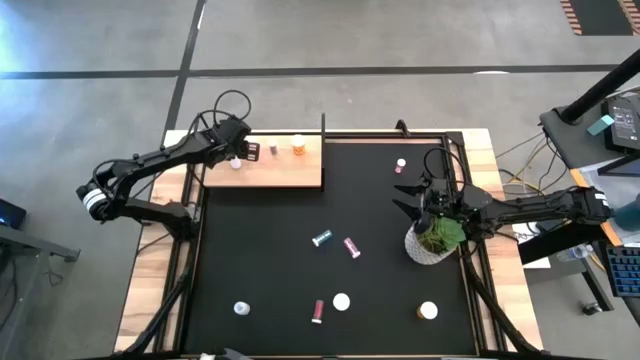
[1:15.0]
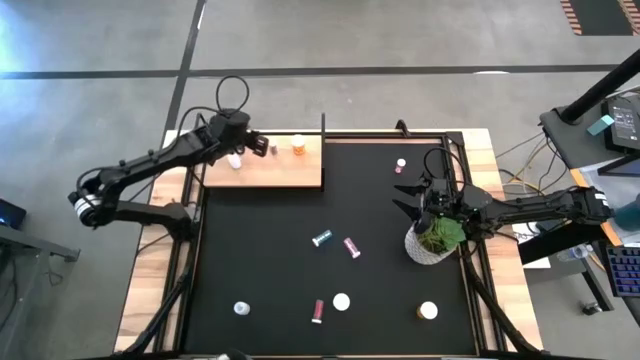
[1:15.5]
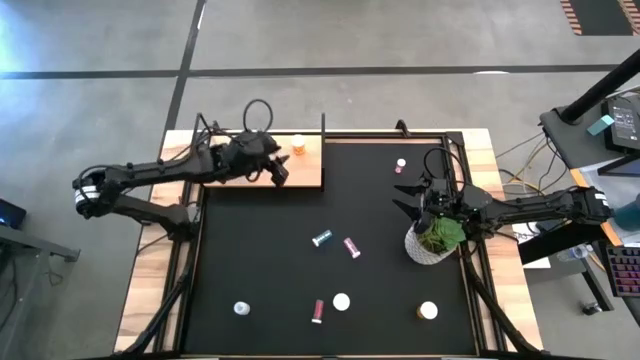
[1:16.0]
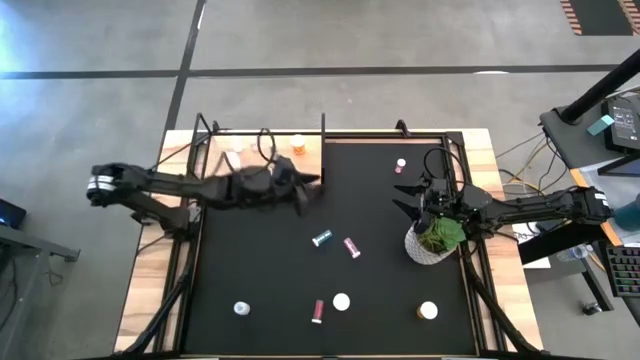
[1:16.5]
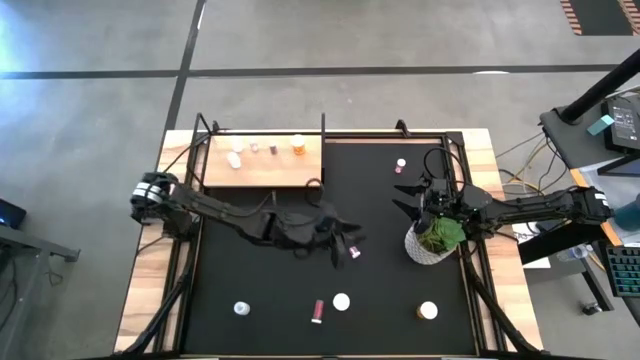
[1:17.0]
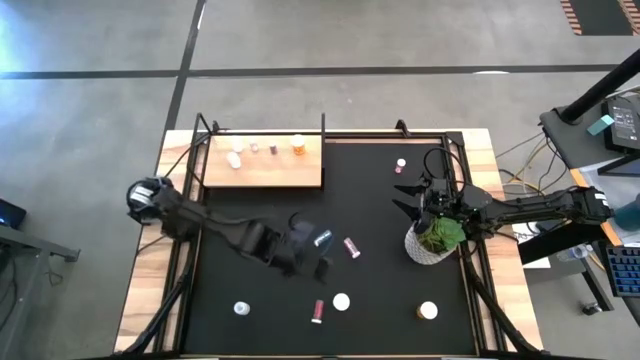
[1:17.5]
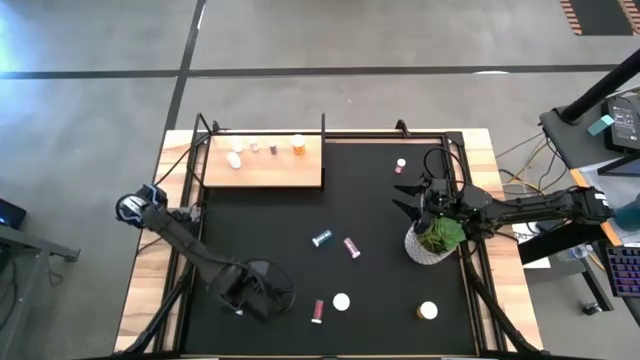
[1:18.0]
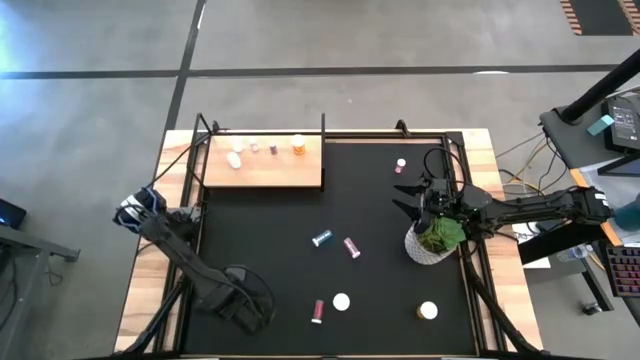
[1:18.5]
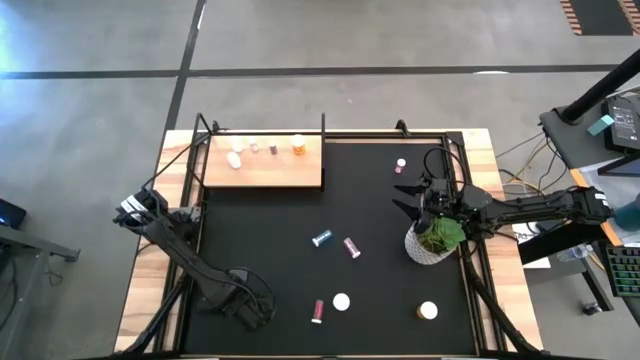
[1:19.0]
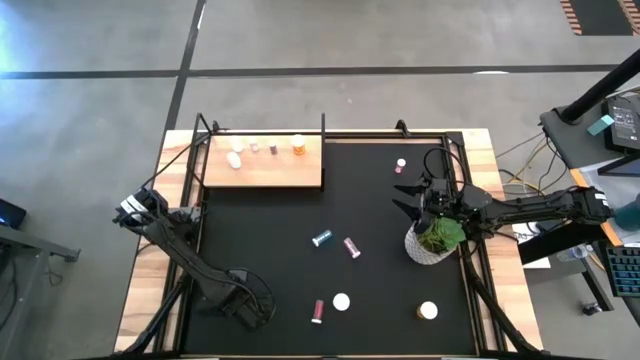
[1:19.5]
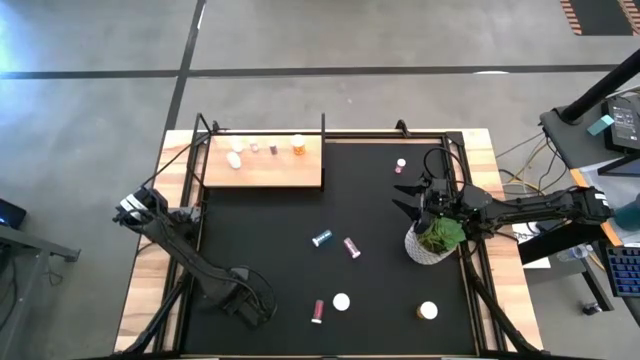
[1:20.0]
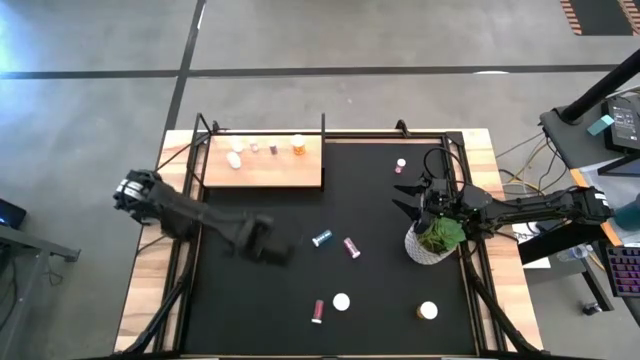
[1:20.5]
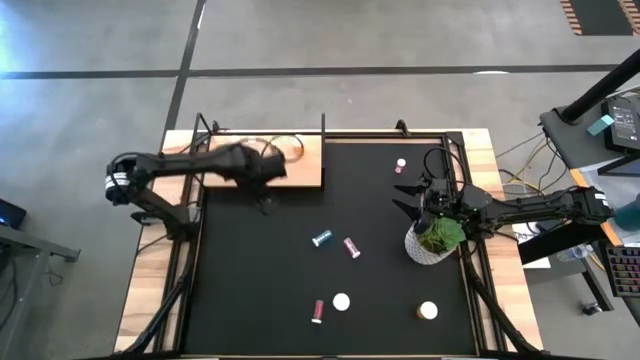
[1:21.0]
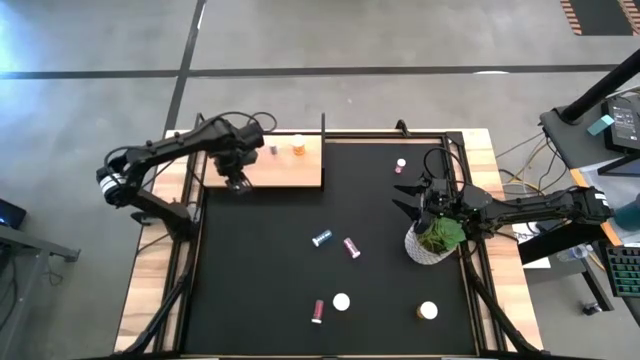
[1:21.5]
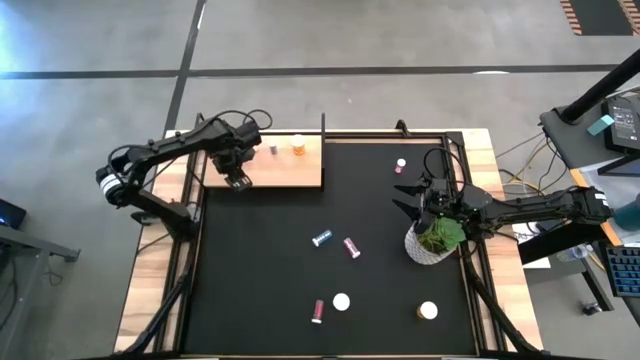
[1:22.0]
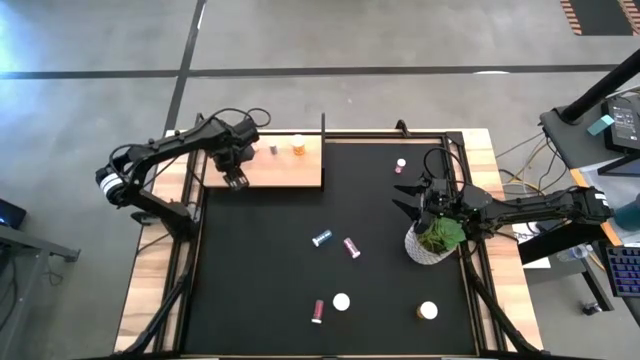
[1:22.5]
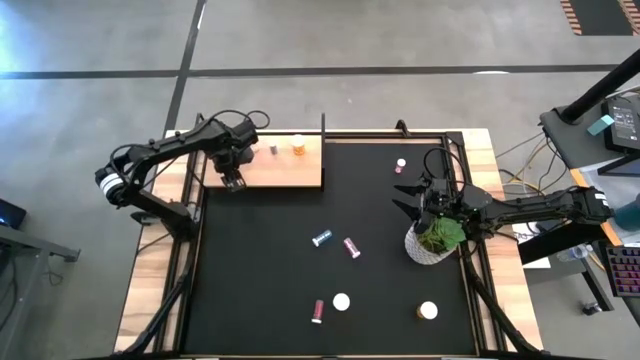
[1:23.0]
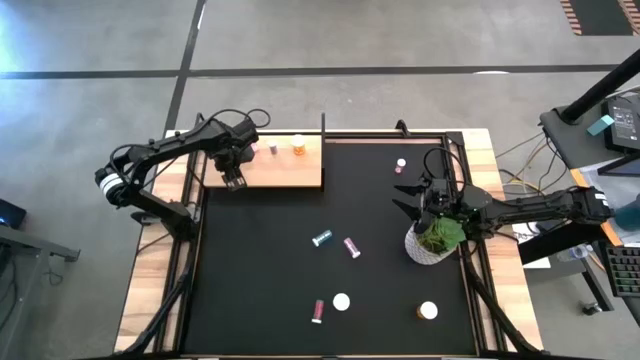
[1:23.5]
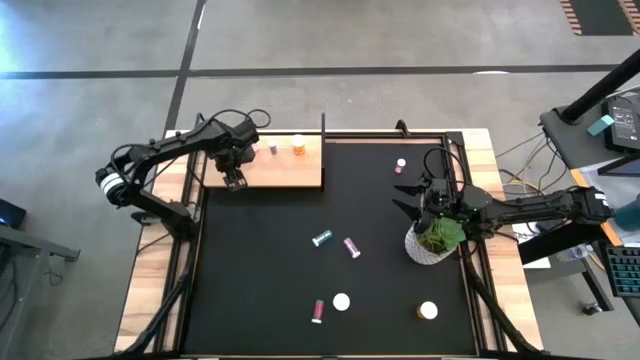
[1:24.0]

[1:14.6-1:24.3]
Task: Pick and place medicine bottles onto shelf by color
Put the white pill bottle into the shelf

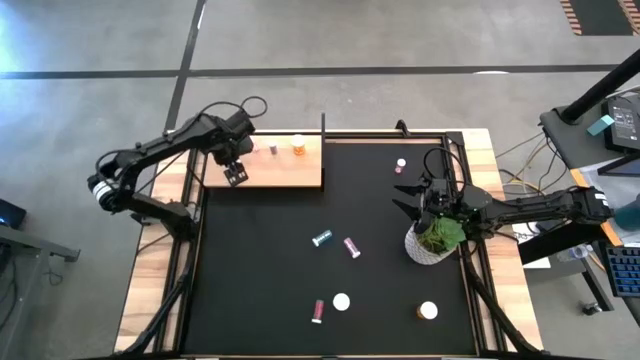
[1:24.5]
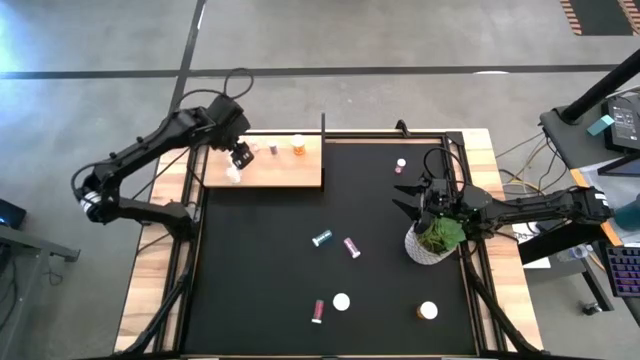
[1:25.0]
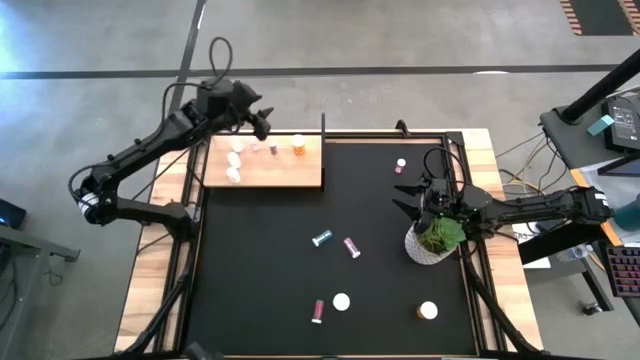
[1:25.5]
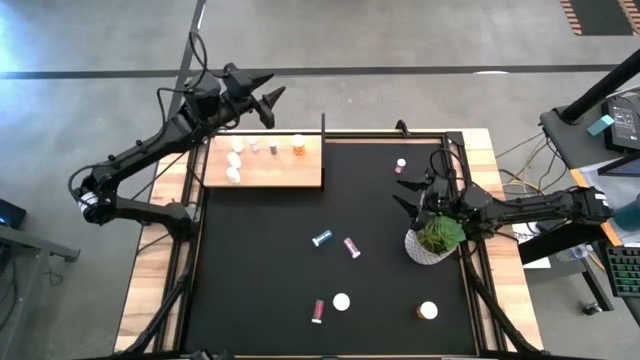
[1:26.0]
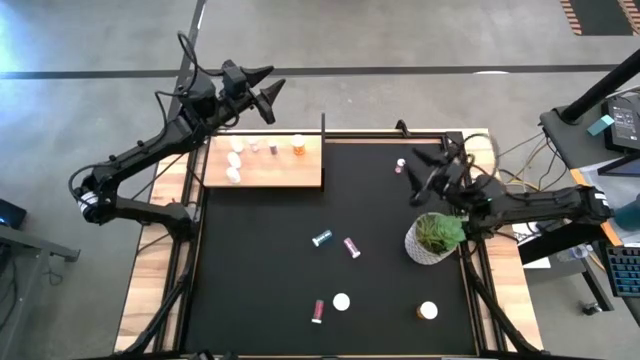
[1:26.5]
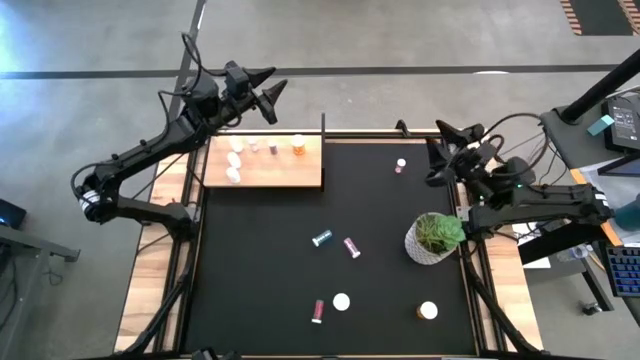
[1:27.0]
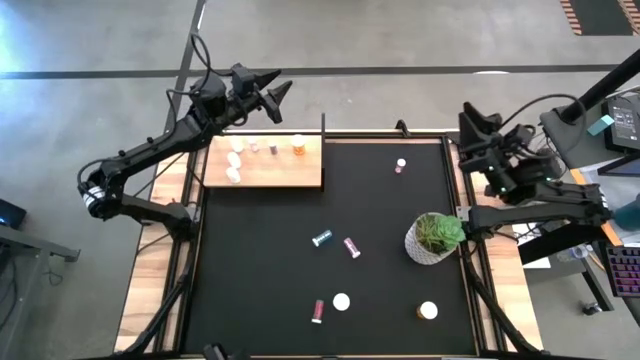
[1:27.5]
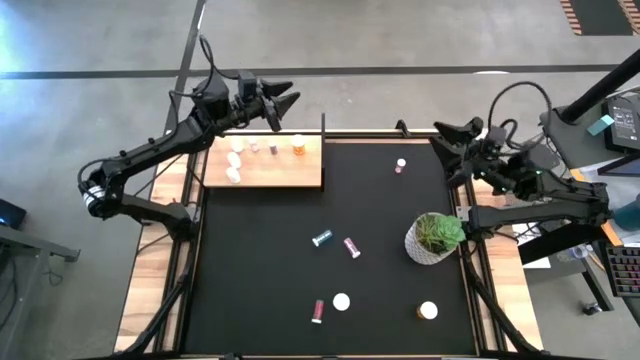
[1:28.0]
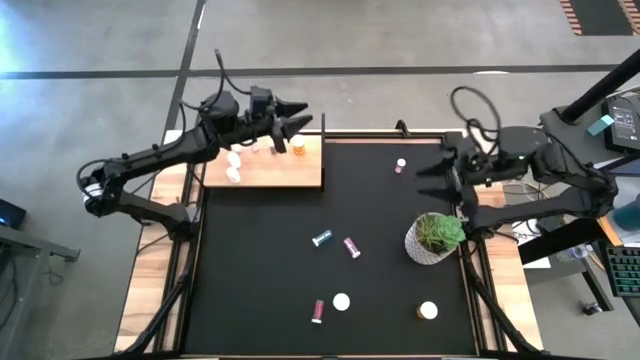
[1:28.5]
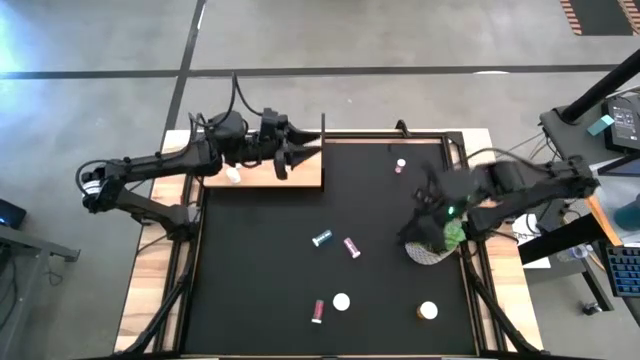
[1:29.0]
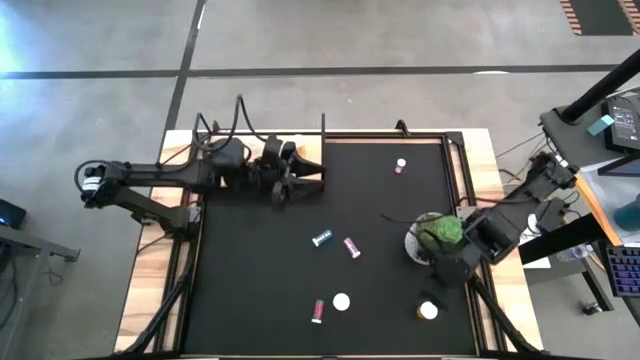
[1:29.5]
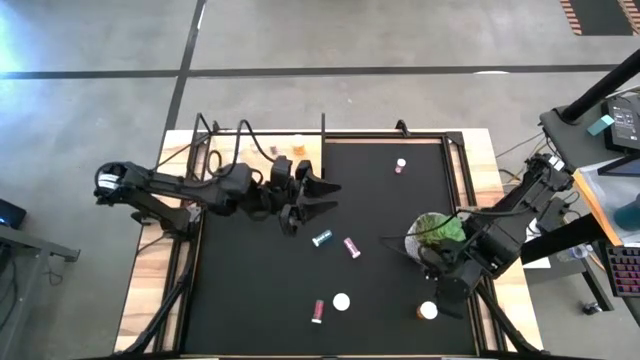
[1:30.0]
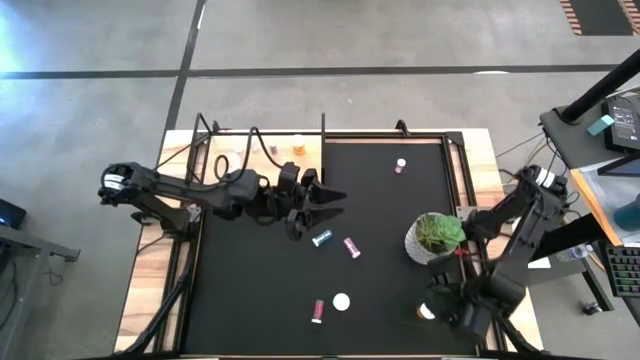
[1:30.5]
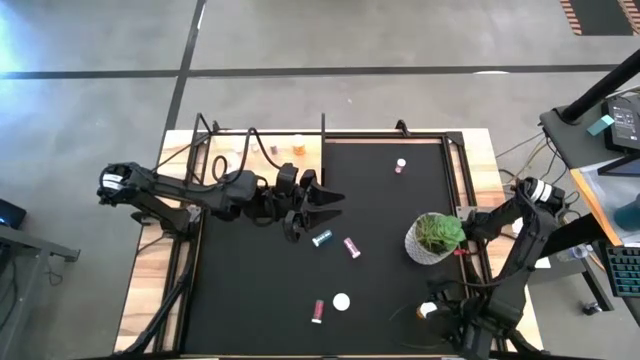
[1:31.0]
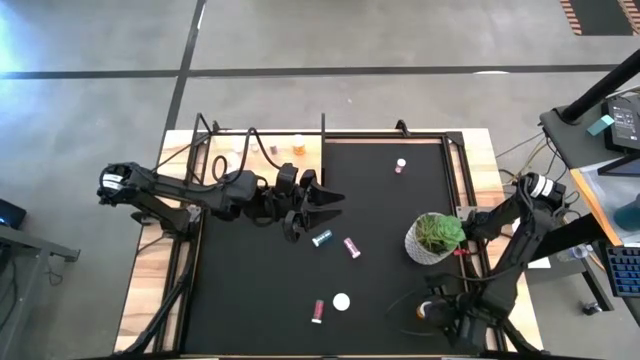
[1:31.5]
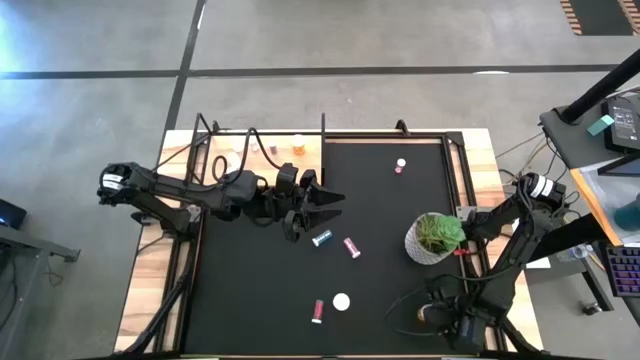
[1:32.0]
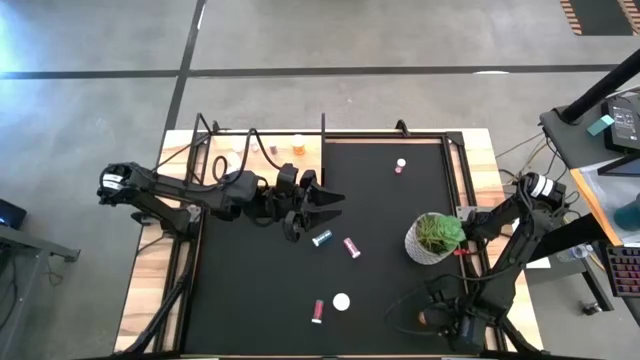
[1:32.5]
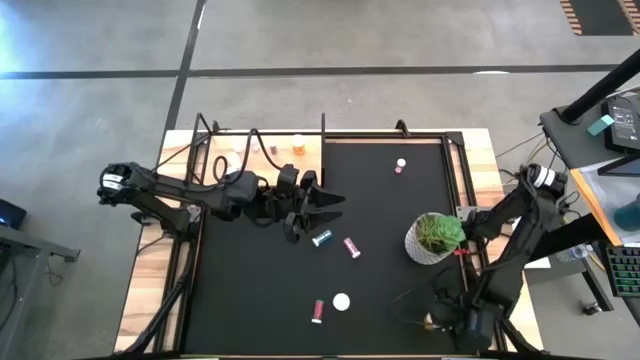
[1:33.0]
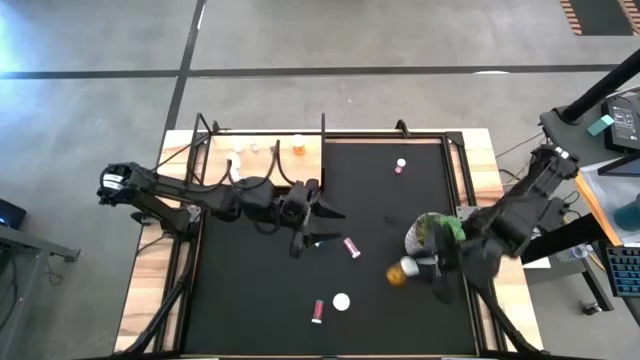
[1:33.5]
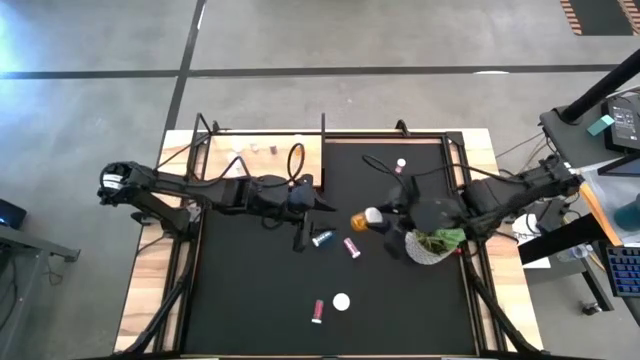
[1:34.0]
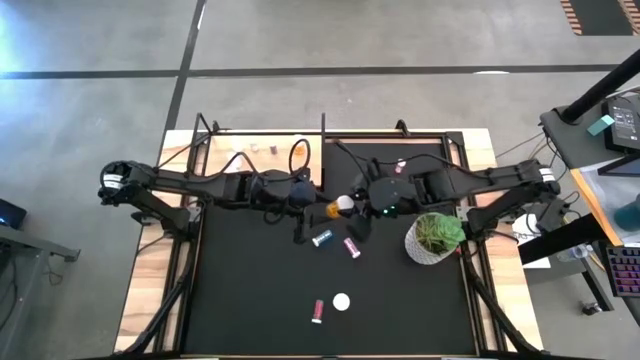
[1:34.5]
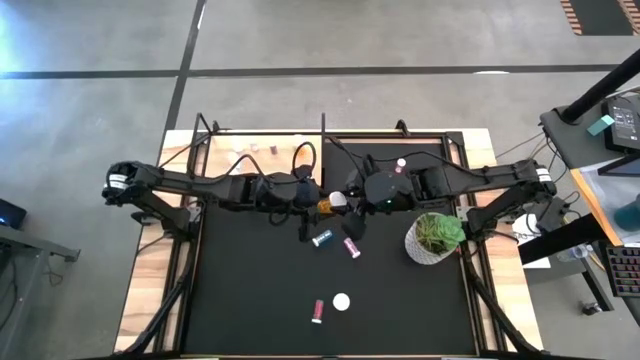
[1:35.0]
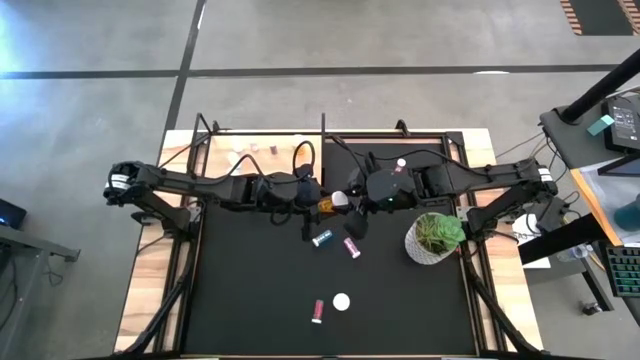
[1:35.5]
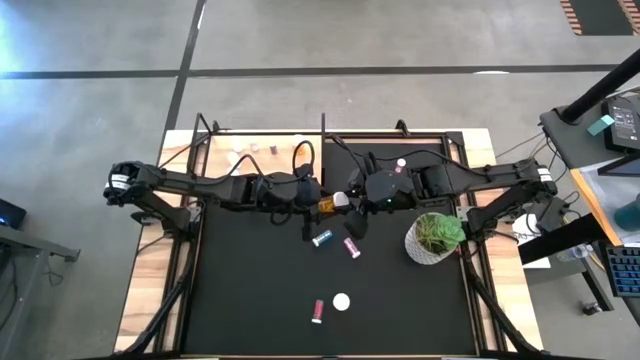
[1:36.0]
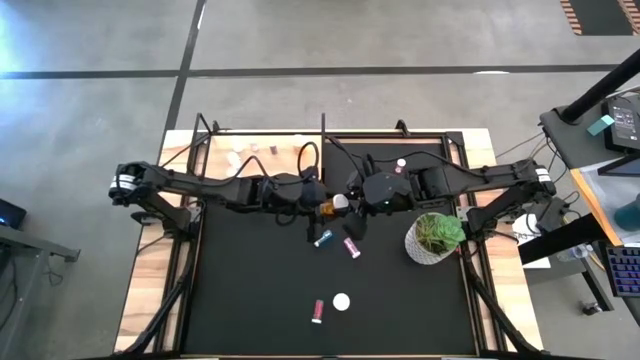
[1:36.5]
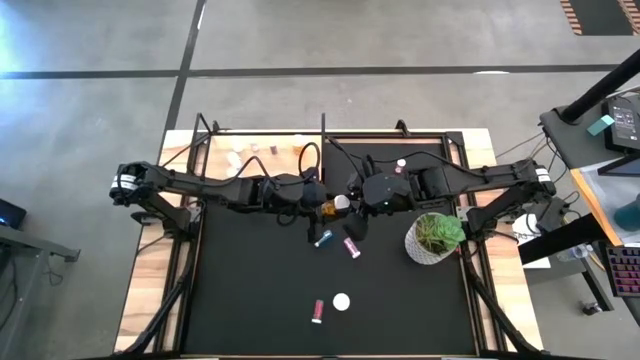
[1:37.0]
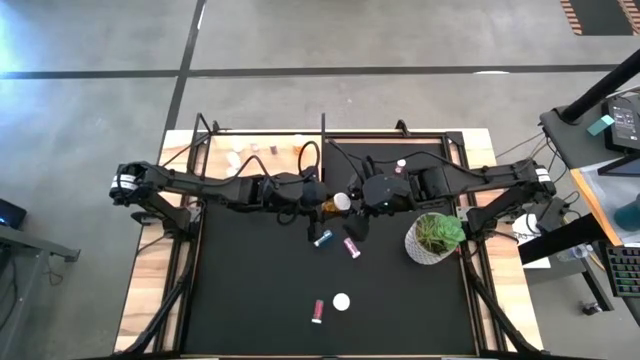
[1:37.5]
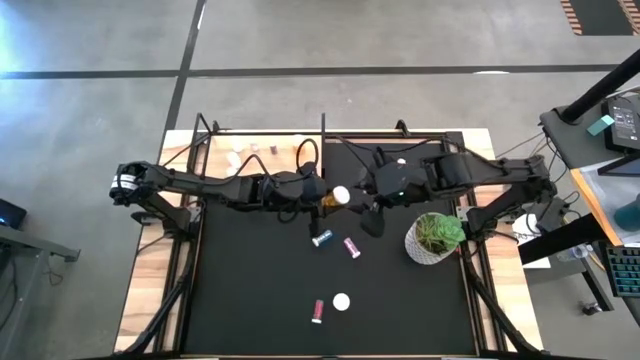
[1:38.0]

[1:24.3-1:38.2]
Put the right orange pill bottle into the shelf
